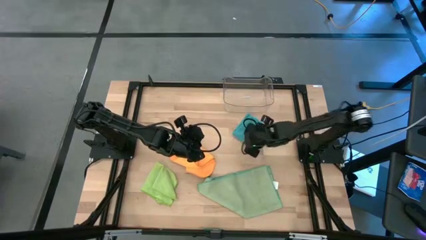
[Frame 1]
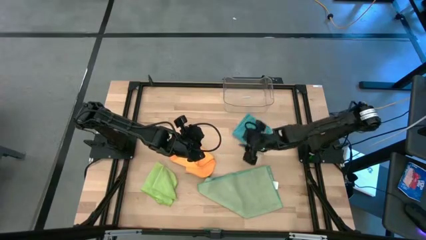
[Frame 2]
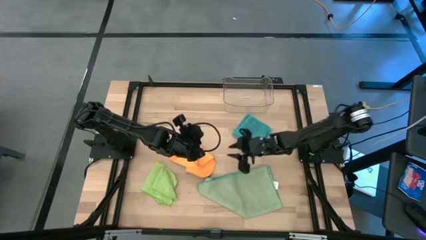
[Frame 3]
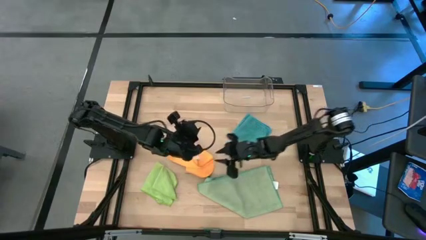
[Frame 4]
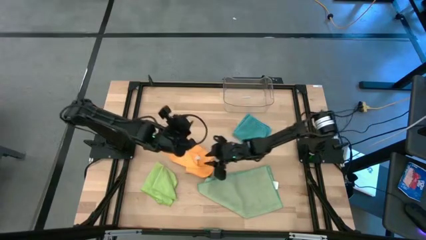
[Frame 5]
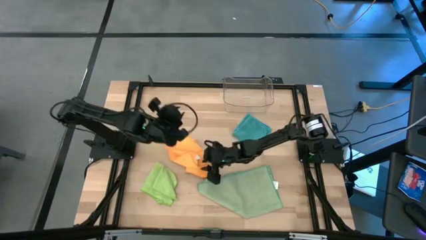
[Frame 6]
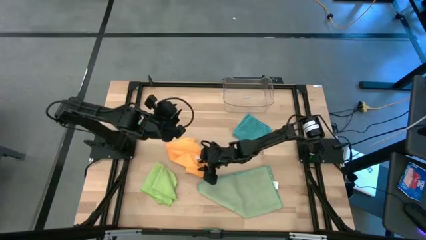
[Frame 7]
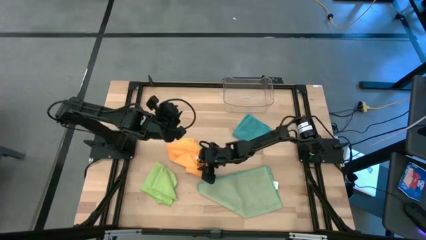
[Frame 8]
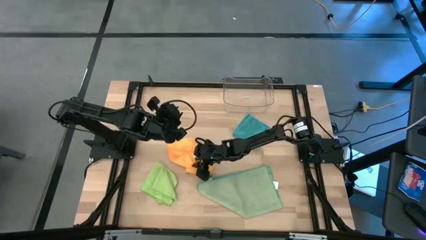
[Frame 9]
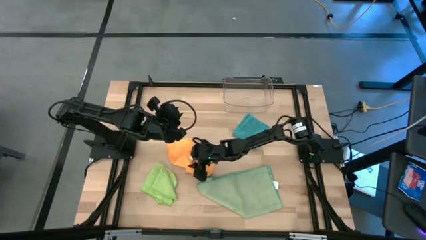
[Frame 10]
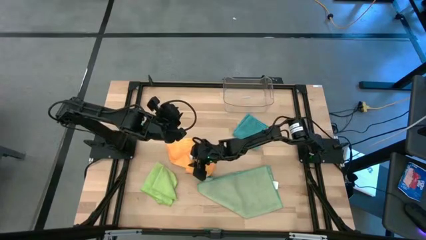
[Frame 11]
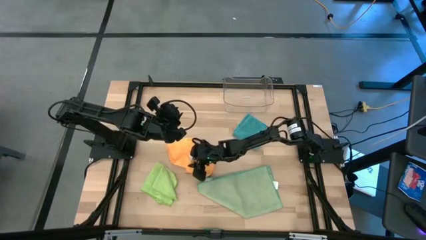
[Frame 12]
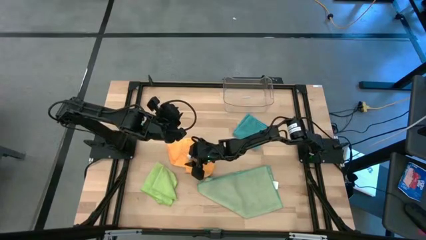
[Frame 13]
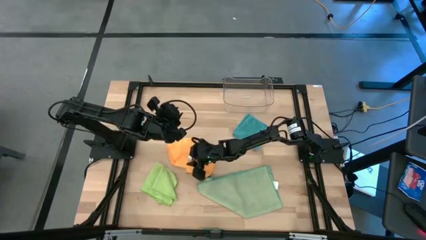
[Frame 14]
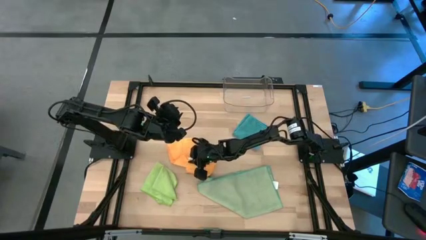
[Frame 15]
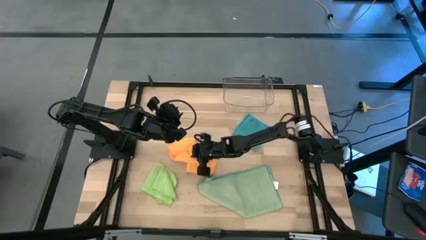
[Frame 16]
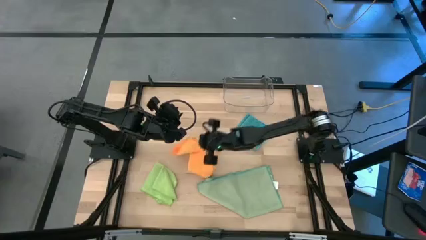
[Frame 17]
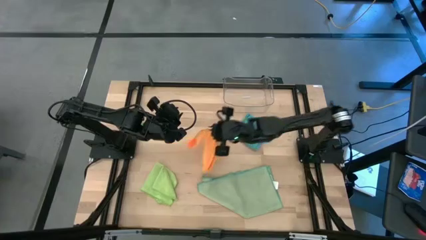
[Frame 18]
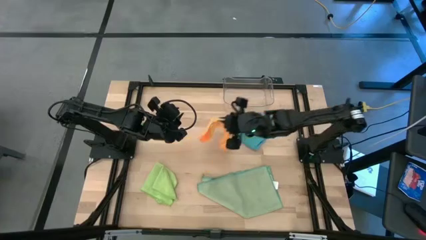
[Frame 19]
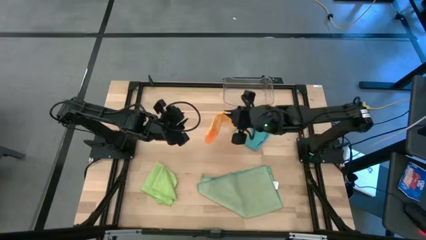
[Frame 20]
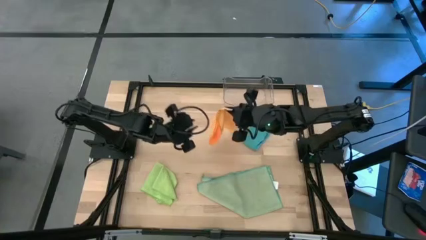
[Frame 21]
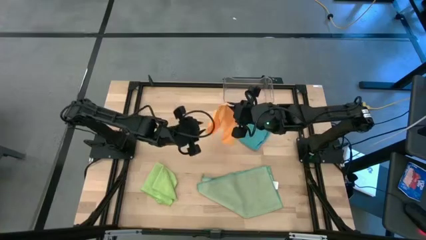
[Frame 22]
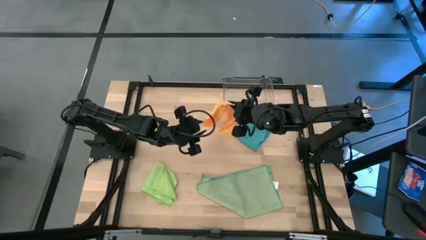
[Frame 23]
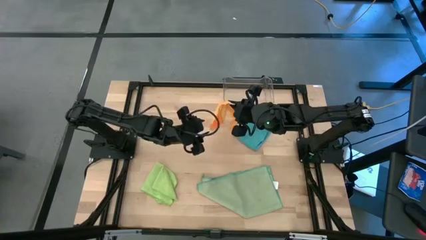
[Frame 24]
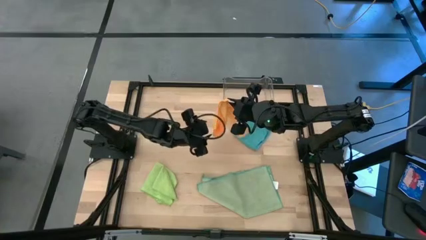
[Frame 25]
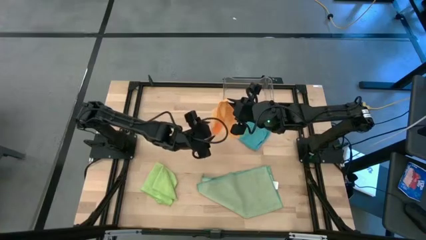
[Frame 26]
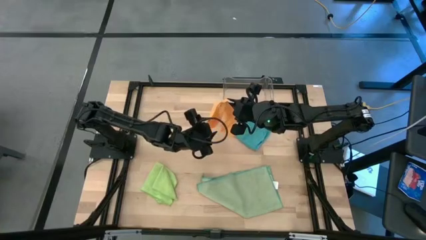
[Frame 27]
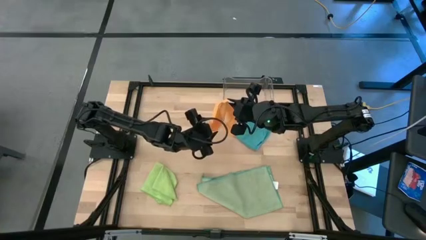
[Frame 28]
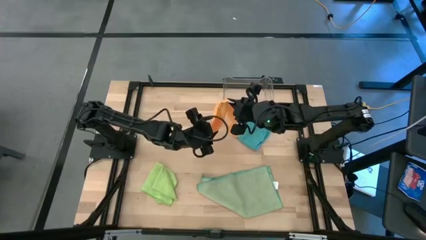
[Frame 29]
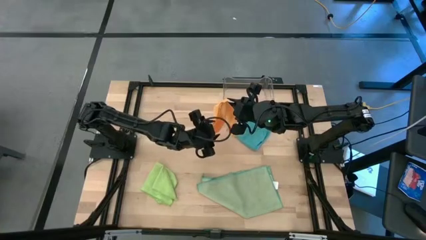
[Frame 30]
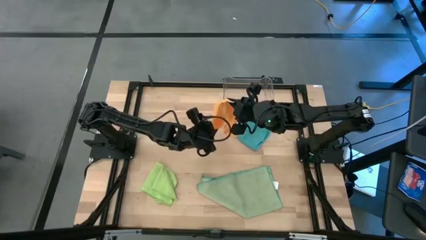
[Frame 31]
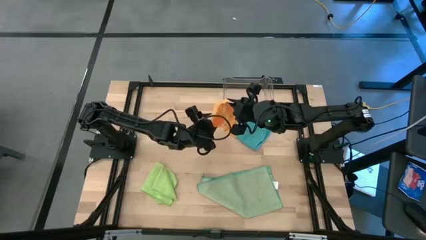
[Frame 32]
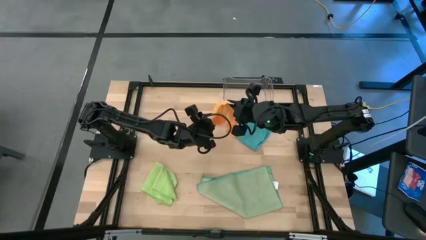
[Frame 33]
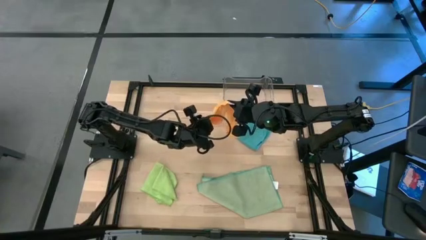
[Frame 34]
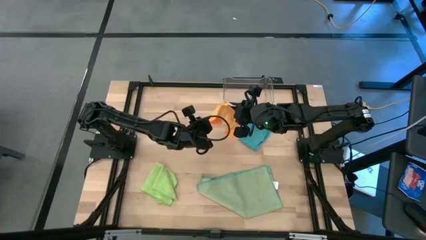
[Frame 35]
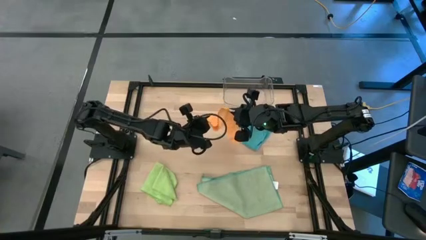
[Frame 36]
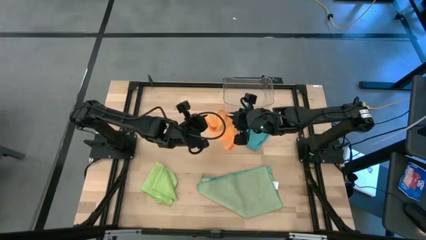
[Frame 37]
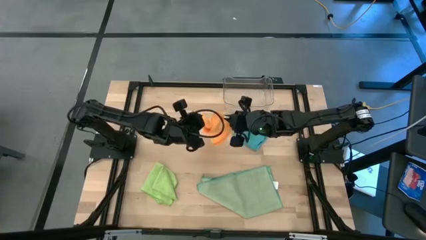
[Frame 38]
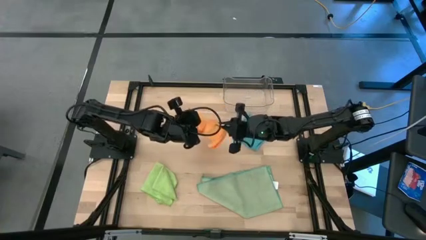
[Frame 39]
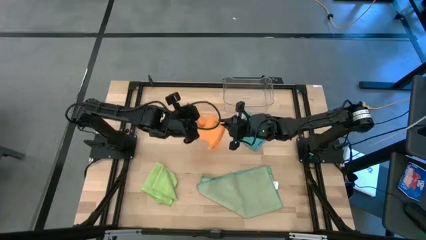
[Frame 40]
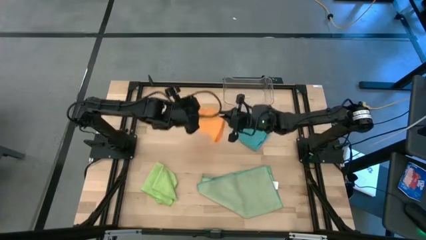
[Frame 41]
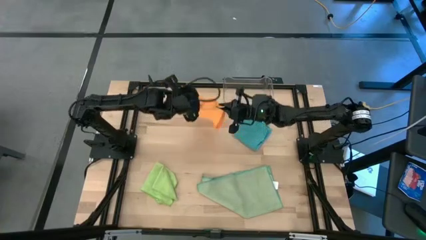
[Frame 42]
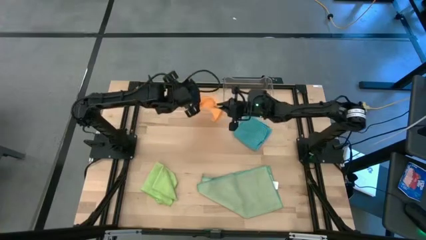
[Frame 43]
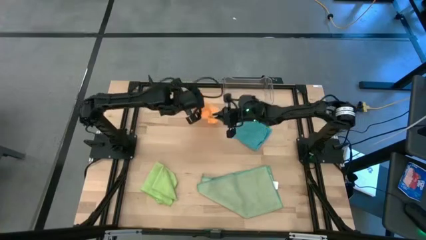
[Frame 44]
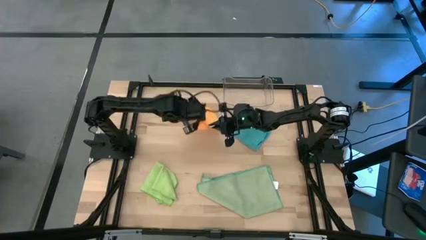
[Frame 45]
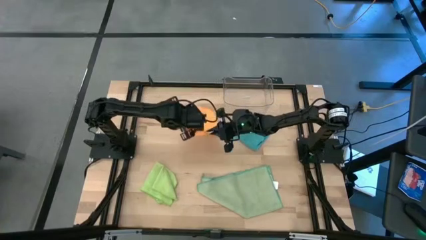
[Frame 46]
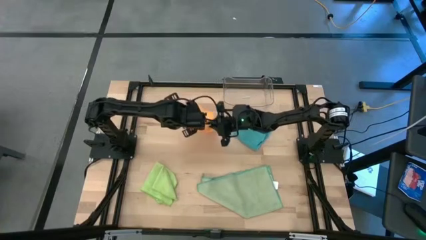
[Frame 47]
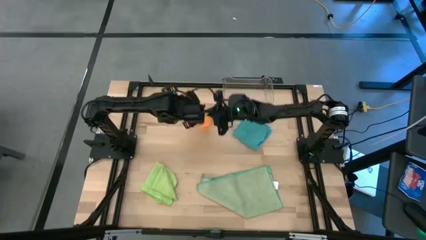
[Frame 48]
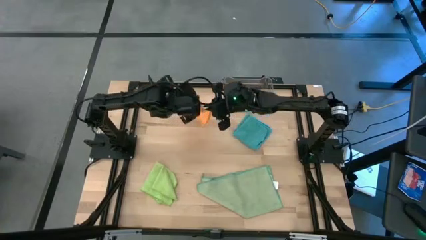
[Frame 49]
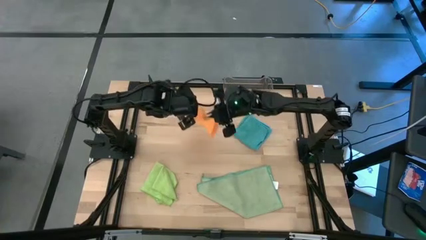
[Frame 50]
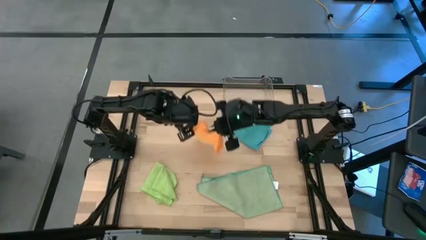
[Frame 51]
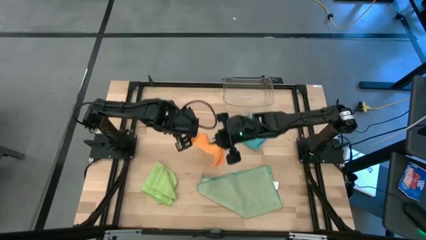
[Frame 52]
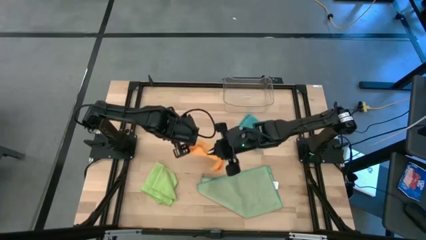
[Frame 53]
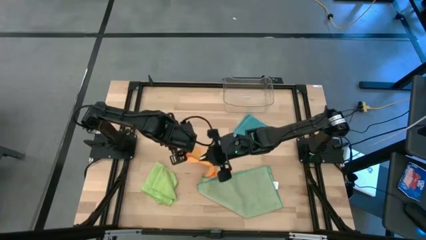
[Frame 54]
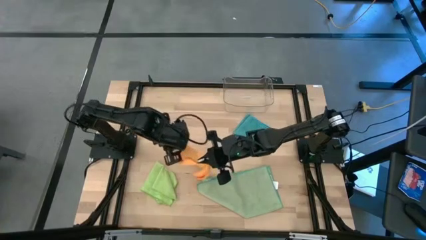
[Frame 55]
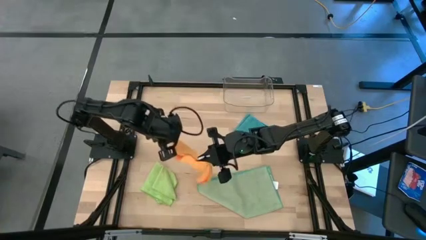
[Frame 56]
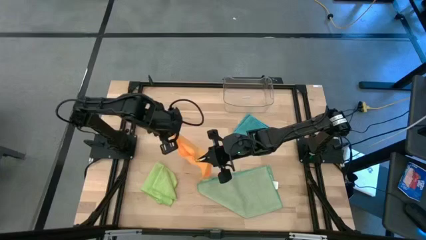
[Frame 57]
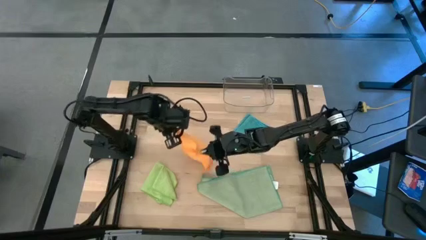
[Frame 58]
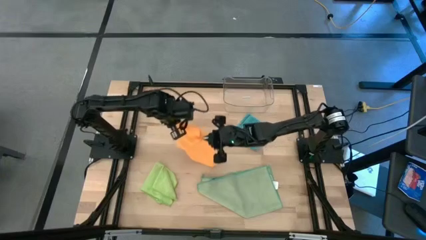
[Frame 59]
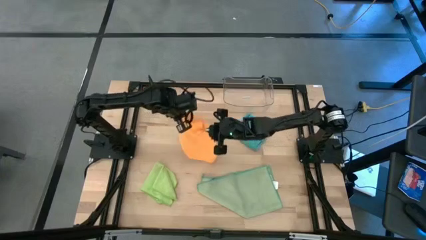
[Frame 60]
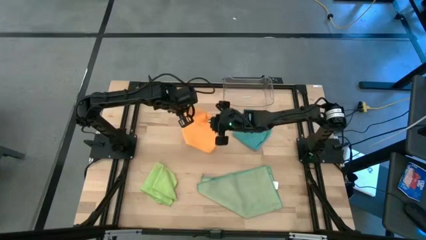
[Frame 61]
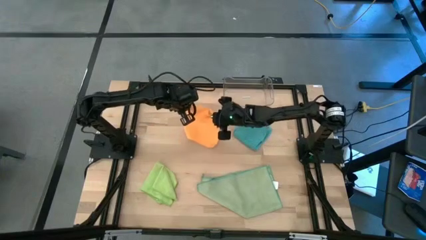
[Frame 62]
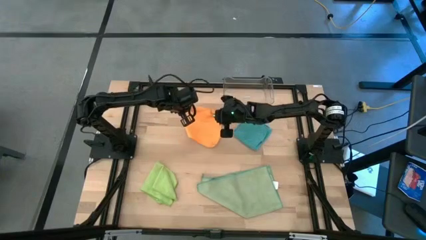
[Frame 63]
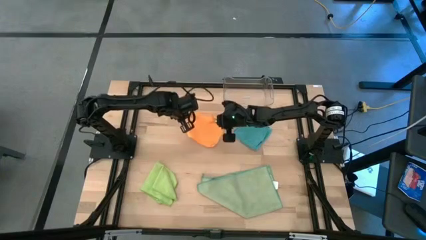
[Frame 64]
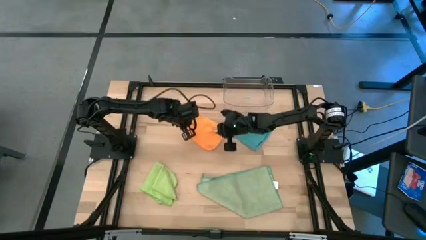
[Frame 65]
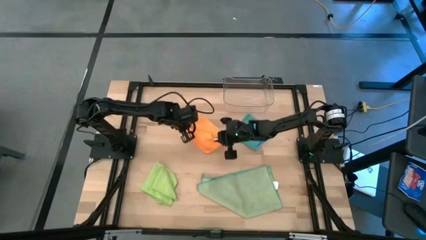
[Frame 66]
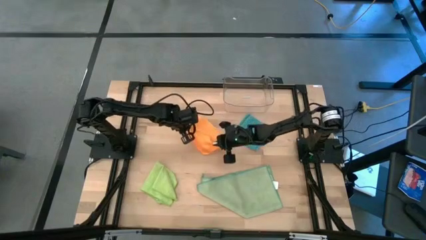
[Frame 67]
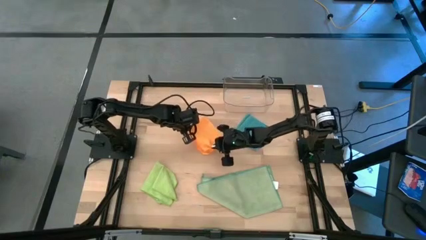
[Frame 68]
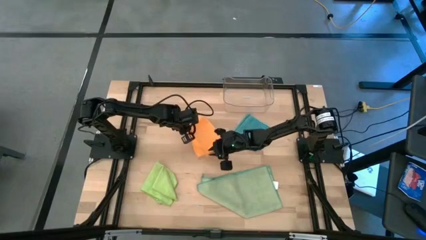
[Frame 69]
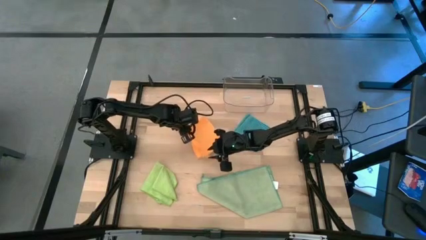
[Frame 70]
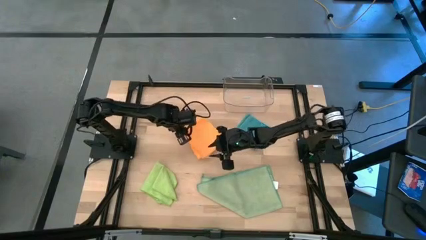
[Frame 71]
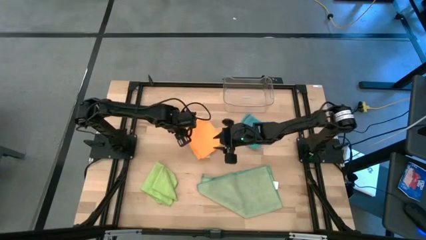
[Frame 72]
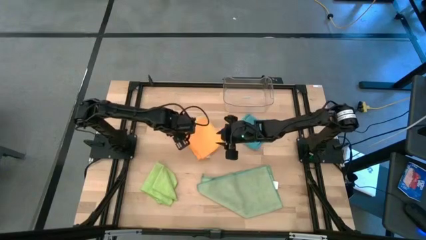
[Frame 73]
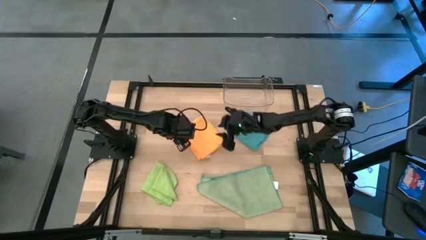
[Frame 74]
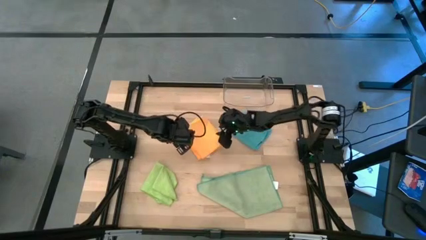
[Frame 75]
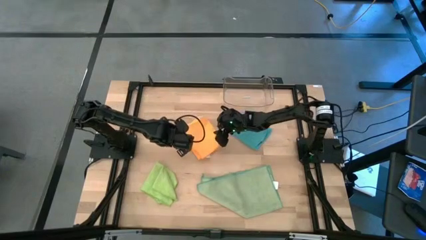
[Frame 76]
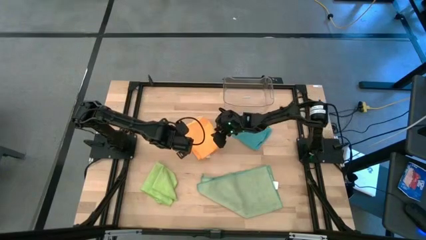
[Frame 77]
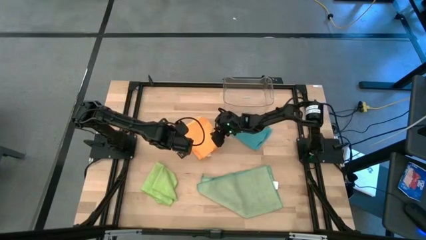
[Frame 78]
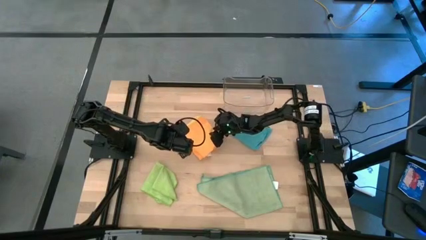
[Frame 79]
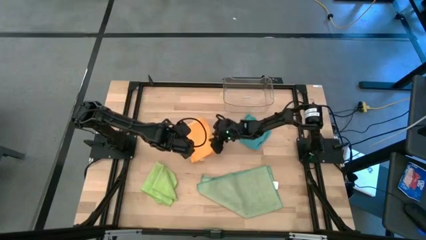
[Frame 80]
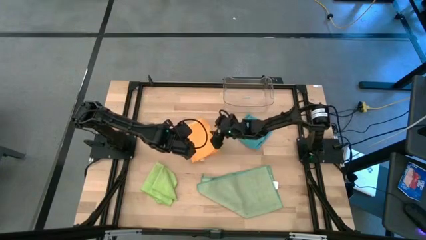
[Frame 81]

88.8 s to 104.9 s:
Task: Fold microfiber towels
Fold the orange microfiber cloth
